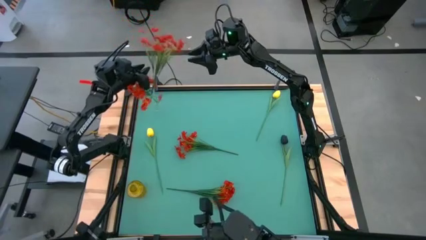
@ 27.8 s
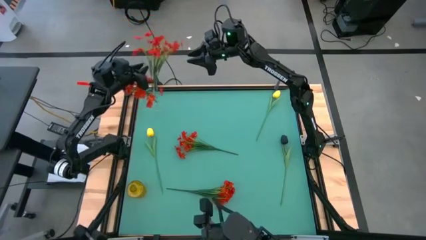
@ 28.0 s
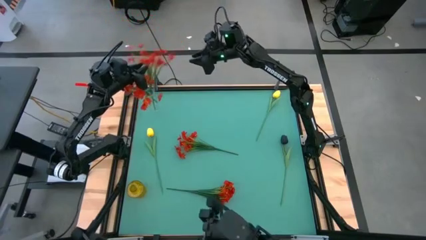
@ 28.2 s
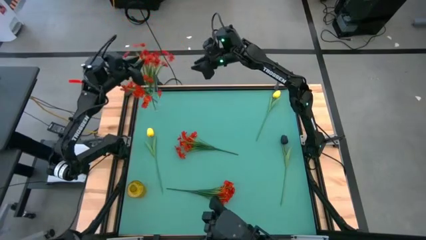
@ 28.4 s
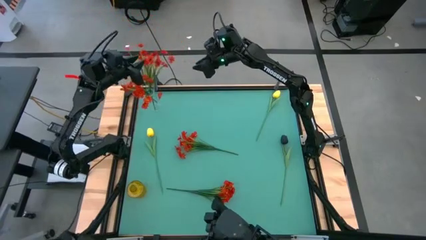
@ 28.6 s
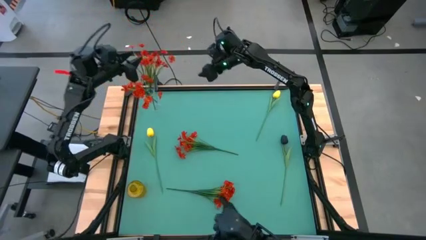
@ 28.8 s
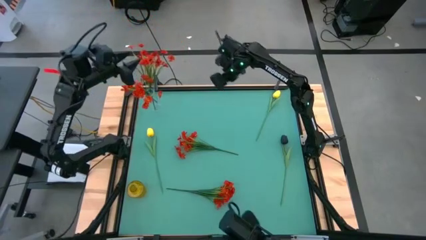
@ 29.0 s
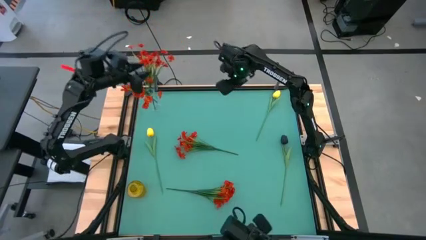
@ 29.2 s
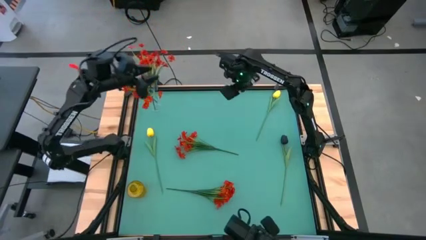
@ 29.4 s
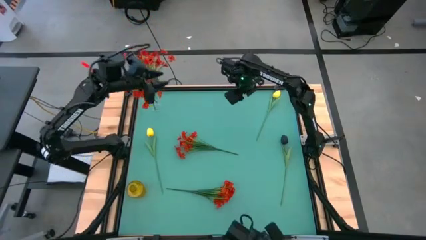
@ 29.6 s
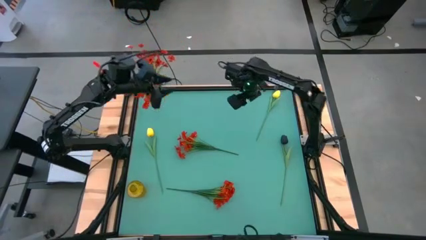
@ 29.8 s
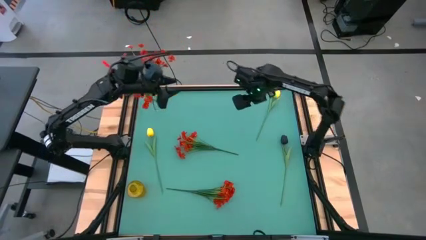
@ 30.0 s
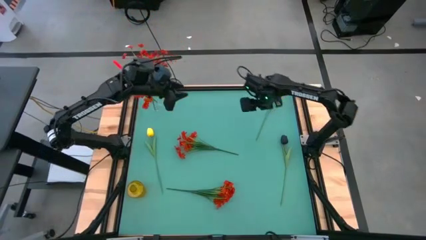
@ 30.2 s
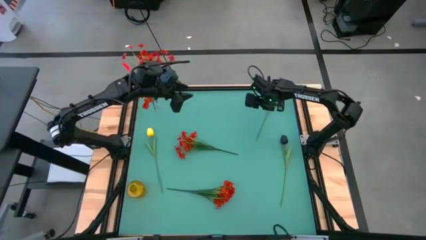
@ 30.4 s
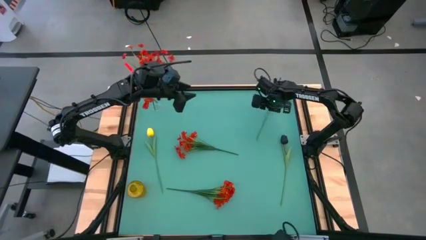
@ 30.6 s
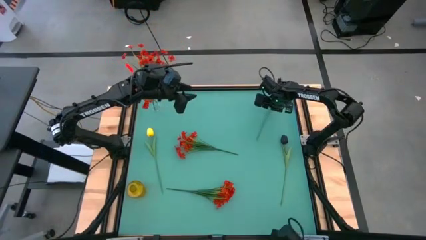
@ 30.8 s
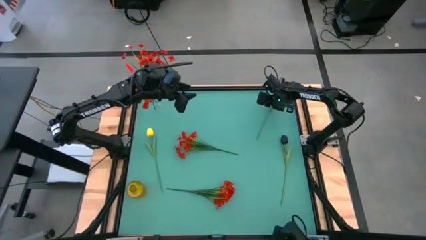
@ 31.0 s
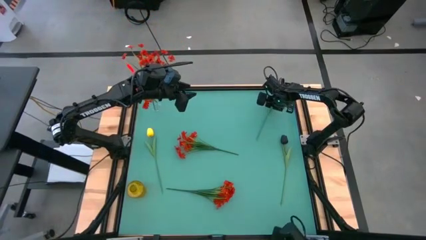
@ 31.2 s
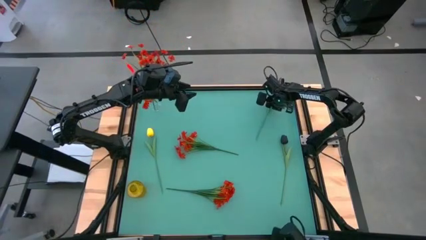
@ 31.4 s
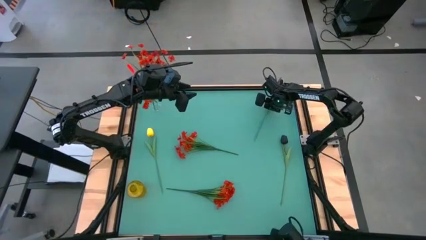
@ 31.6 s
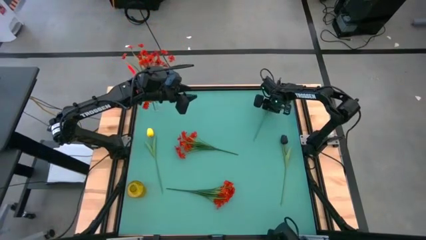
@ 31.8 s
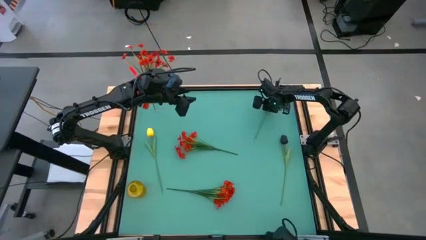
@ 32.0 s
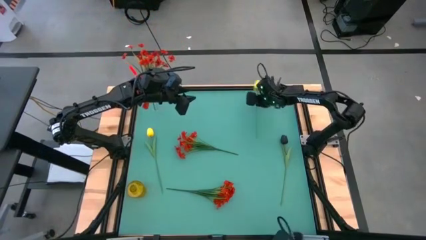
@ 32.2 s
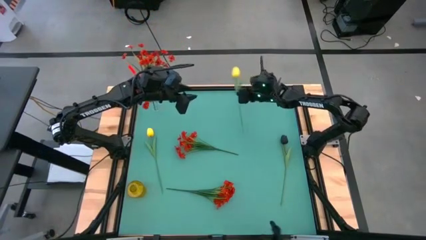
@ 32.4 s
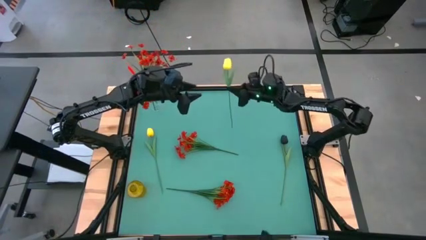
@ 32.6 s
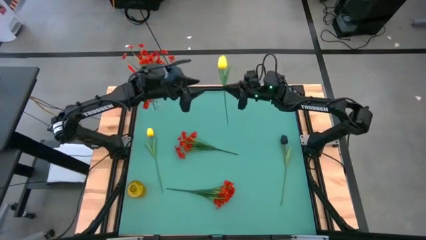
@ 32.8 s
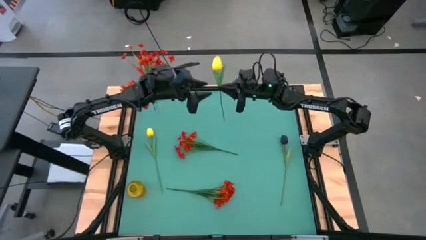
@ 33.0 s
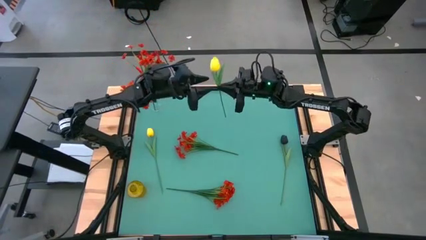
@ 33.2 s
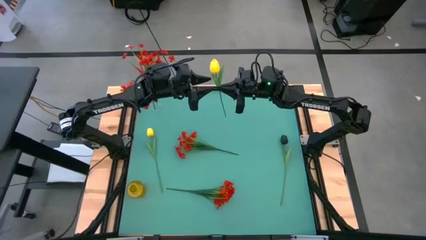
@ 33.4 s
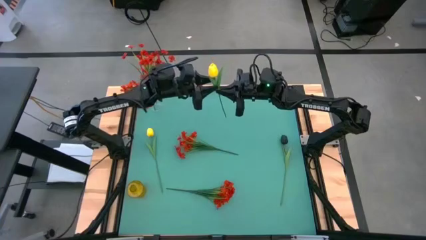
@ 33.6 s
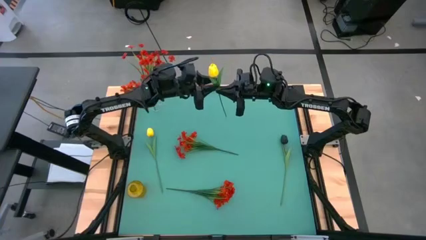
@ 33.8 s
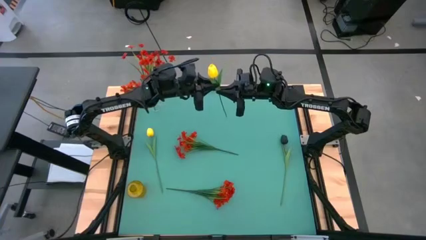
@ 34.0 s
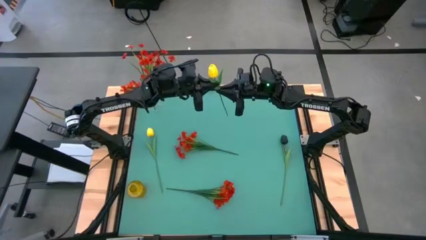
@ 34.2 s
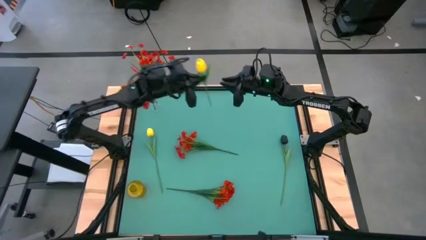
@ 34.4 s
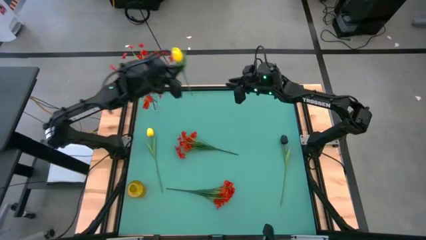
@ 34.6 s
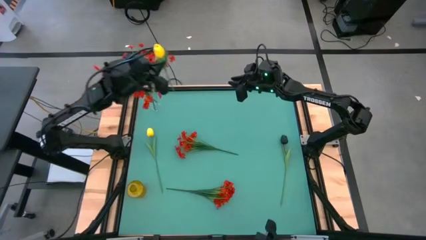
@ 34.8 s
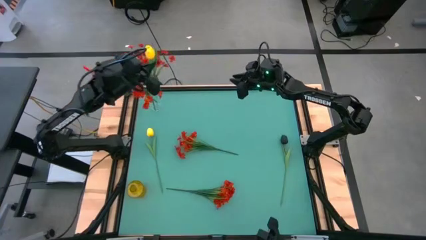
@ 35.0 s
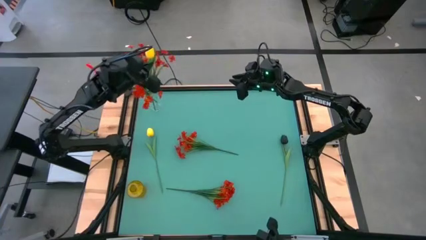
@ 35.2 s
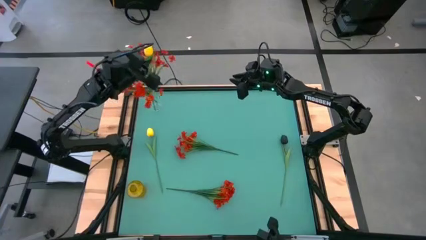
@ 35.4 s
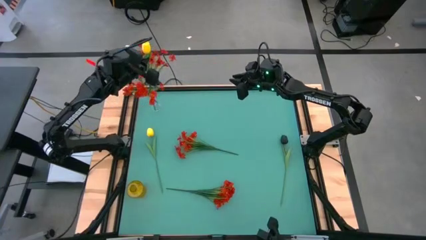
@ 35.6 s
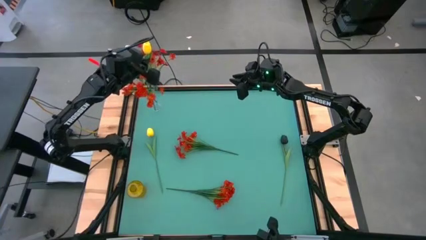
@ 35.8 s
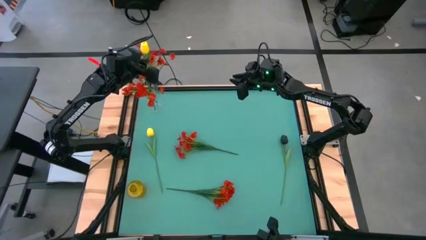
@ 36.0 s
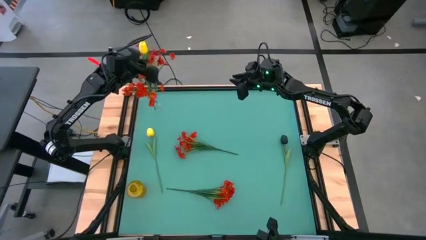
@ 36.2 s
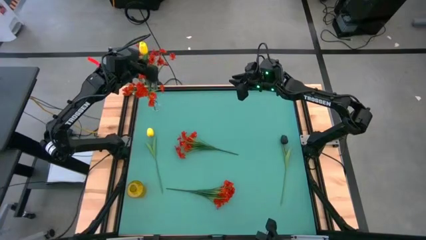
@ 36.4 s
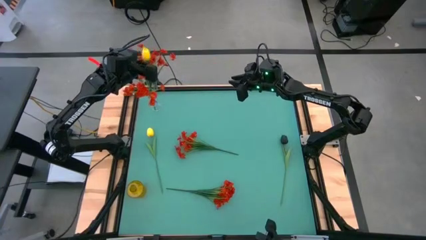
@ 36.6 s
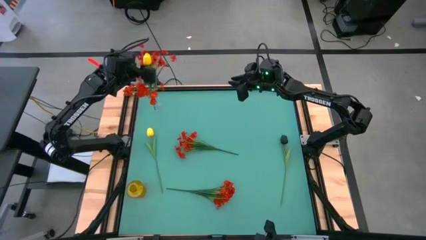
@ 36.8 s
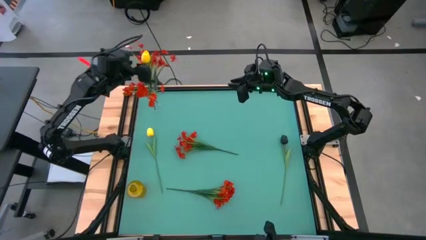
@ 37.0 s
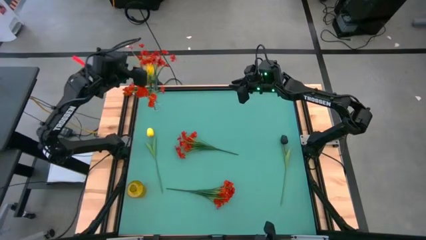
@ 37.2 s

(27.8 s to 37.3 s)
Task: Sort flowers into vase by color
Put the right yellow flower into the transparent vase

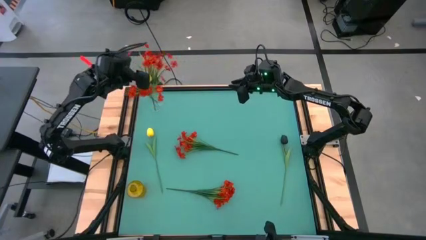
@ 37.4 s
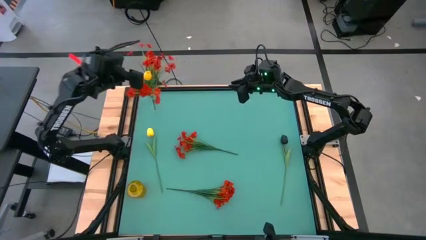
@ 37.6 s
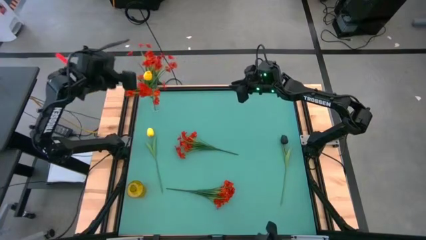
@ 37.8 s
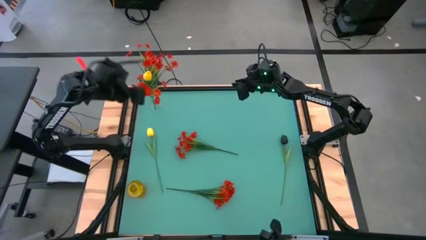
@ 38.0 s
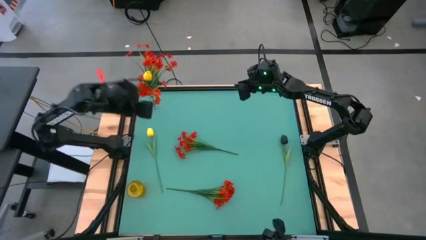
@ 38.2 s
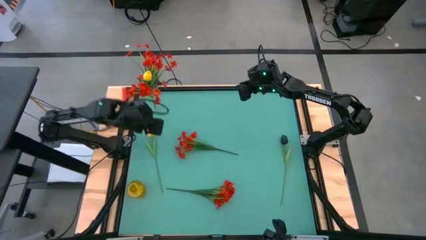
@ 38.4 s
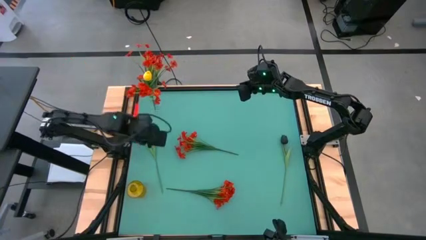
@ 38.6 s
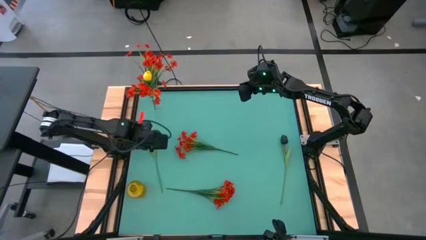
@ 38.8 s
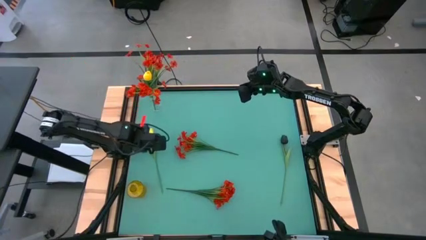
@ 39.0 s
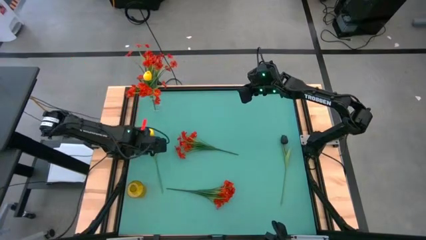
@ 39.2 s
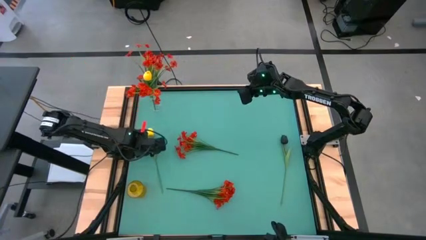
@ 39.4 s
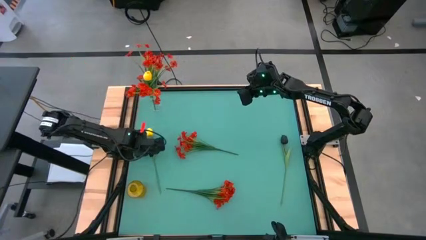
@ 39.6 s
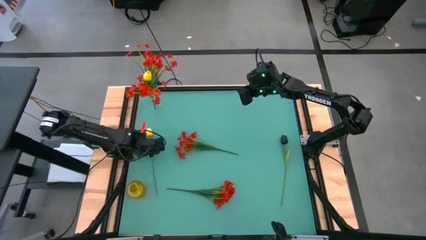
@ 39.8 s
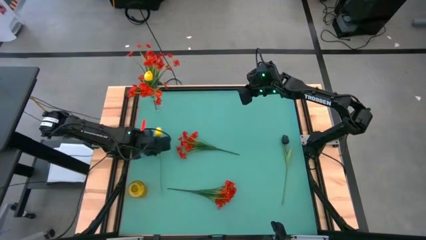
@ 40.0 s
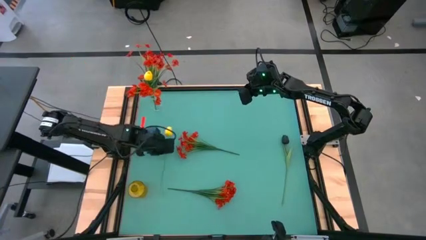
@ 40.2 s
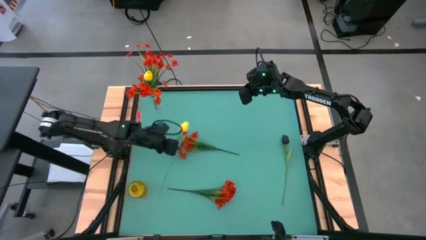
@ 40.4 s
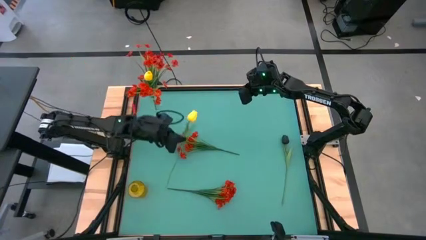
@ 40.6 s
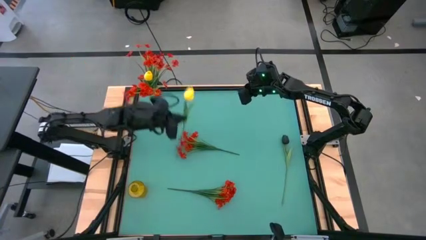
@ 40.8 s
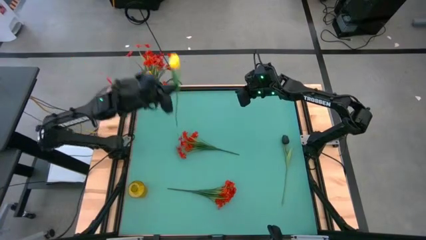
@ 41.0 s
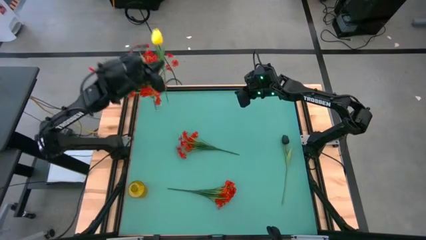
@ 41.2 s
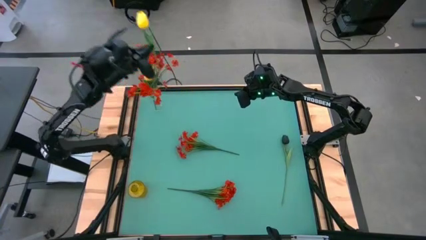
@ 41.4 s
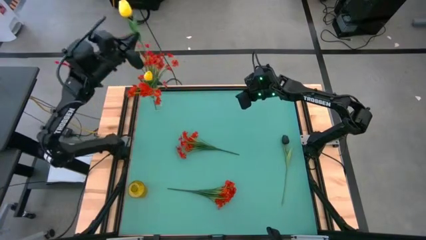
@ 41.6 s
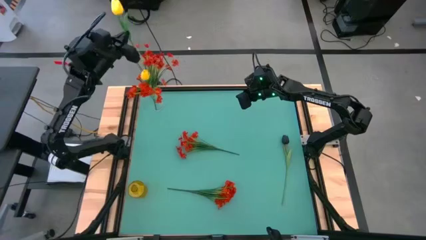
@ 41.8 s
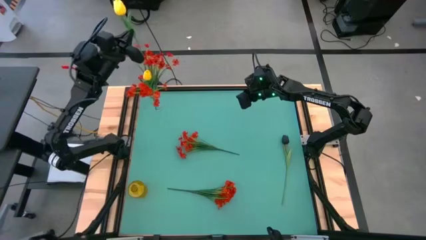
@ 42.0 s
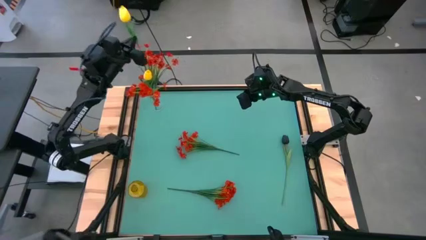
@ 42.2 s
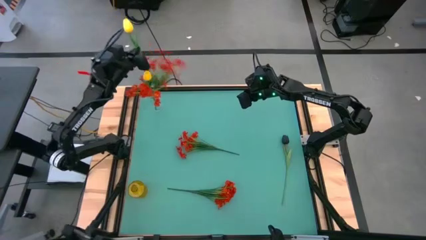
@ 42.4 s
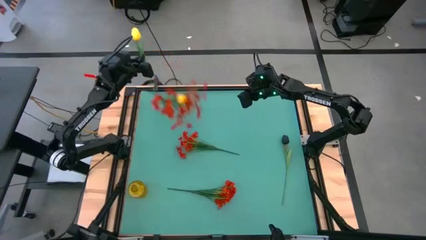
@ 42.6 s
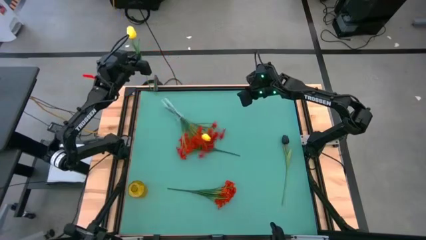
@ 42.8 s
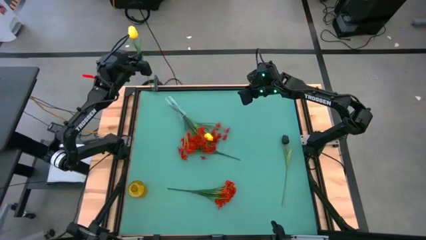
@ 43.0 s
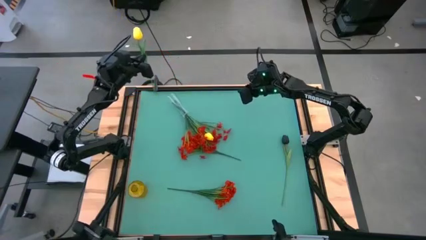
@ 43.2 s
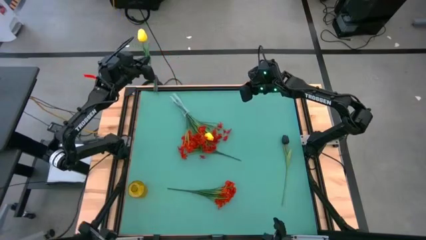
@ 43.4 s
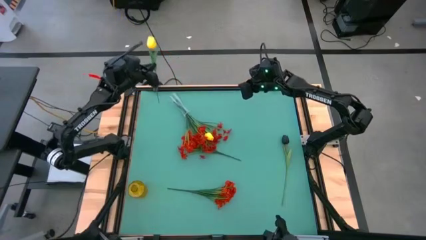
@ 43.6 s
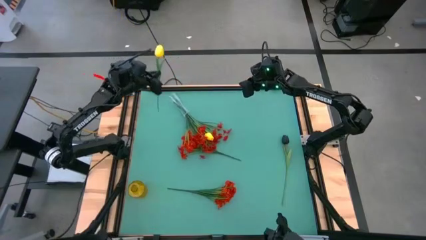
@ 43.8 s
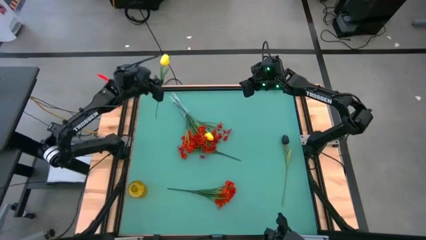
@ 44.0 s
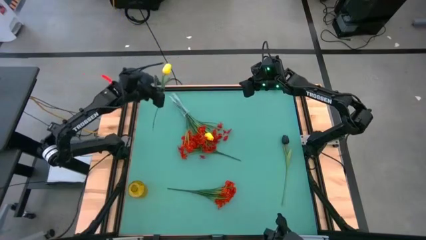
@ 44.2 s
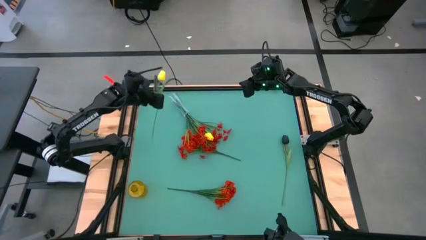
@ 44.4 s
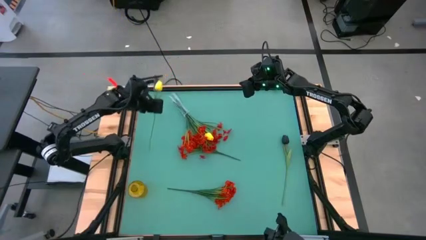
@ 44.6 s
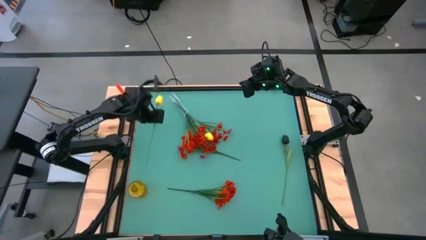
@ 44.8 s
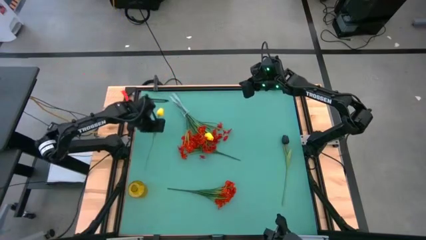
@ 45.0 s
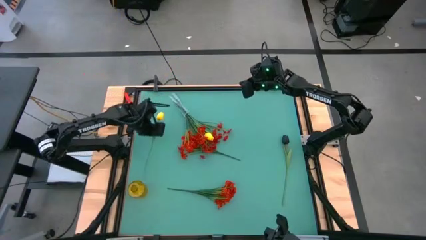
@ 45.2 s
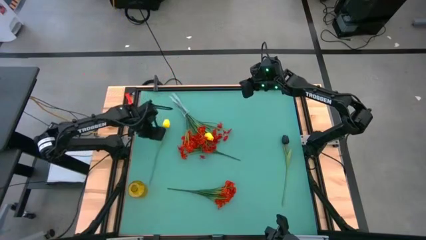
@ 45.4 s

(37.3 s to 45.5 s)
Put the yellow flower into the transparent vase
